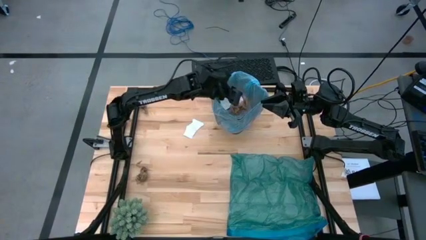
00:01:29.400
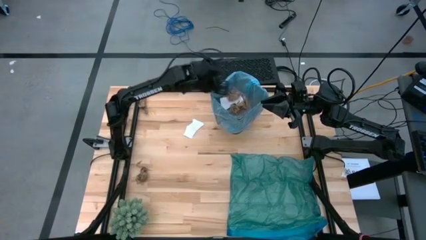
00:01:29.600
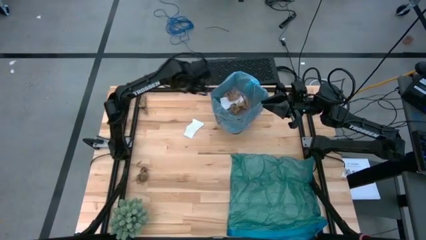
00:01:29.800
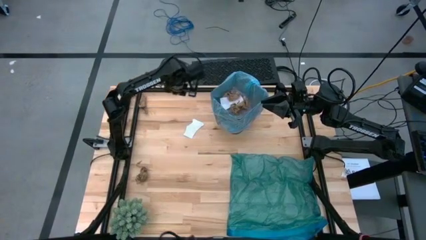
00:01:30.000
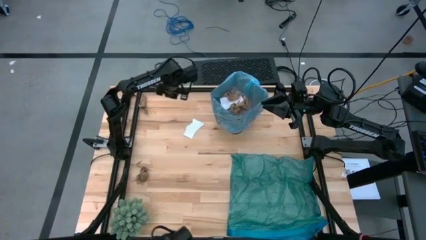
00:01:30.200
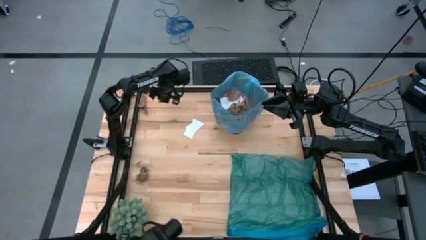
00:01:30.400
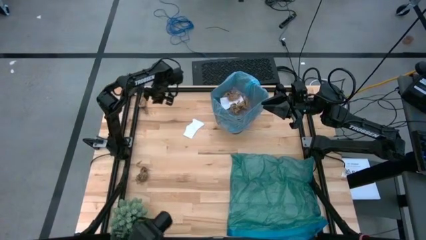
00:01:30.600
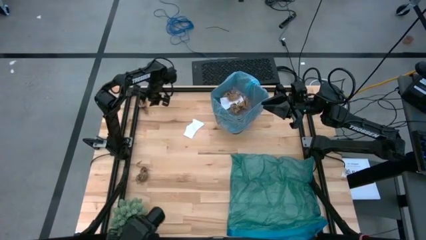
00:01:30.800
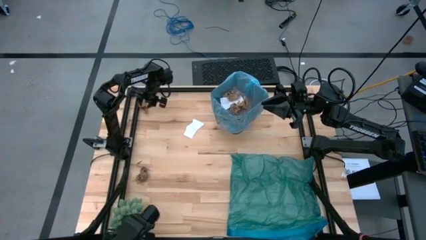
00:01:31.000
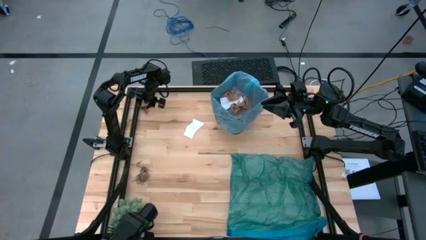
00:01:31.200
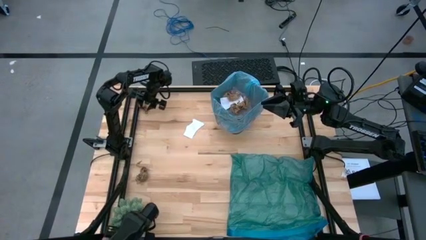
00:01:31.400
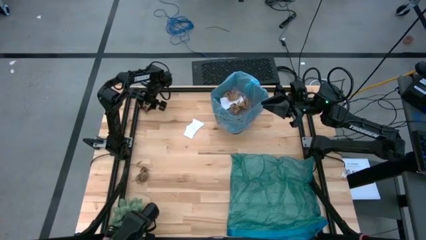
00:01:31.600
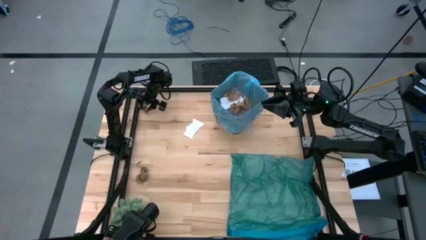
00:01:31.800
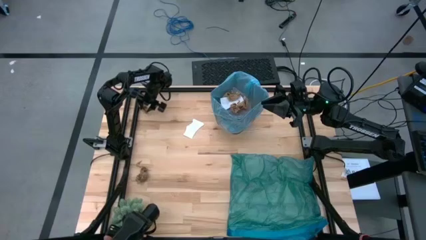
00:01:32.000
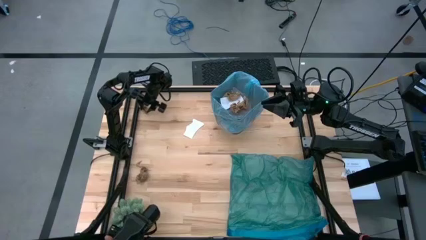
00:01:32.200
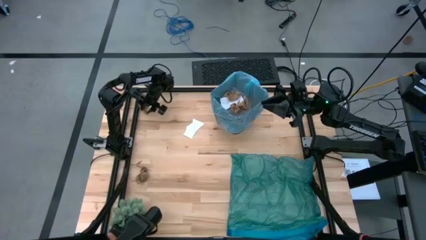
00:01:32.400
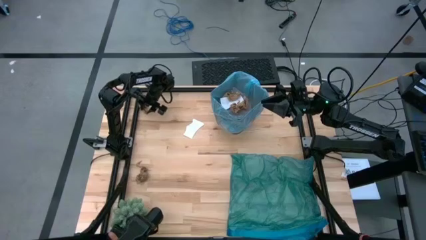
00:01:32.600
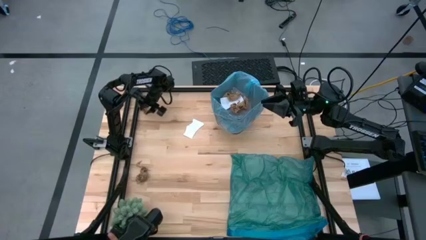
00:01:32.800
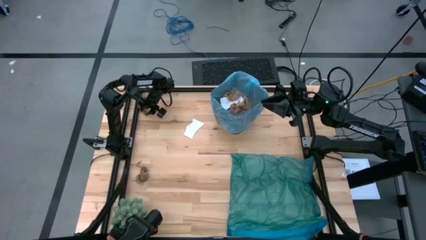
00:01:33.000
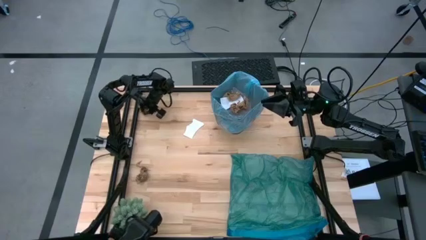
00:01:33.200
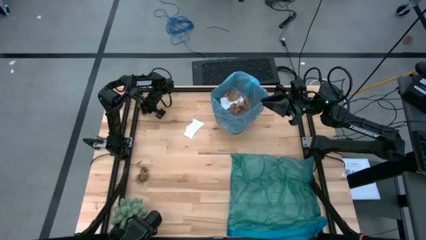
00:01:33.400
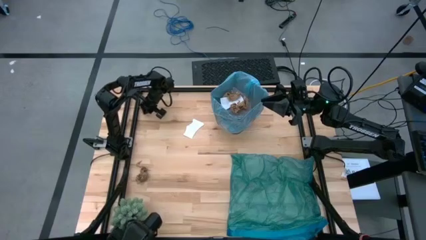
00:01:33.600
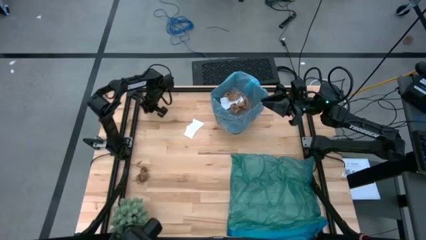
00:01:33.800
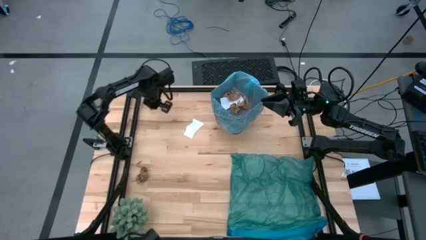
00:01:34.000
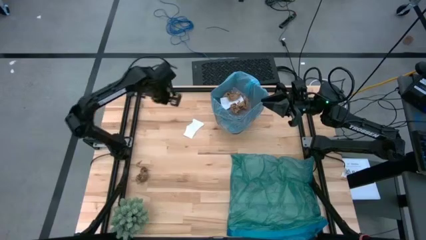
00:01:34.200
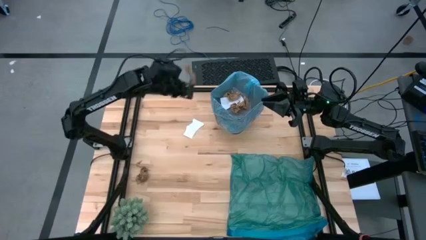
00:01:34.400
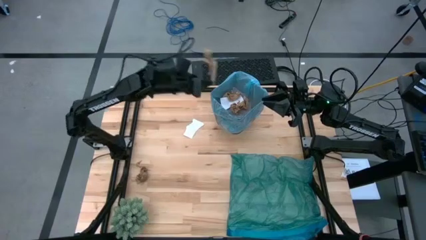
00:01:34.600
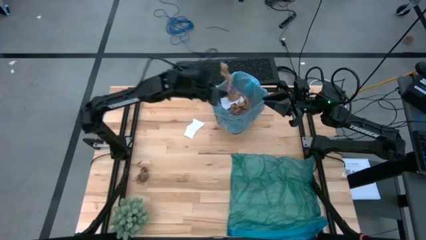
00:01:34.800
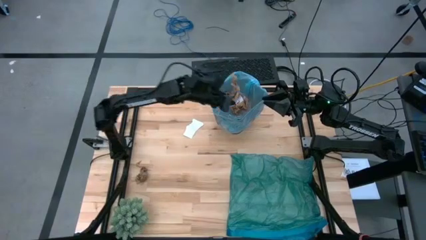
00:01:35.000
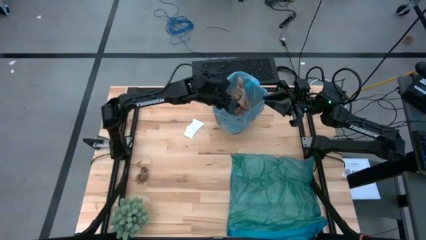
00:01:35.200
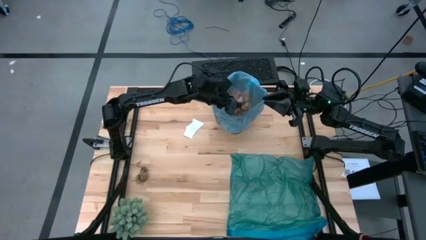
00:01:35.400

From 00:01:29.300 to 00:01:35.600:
Task: place trash/remove bag and relplace
Put the brown napkin into the black trash bin

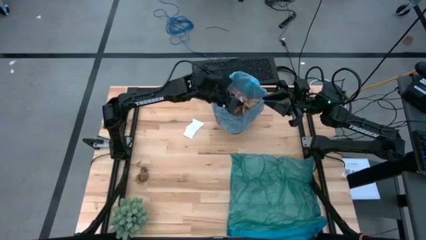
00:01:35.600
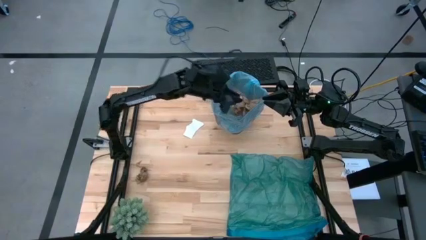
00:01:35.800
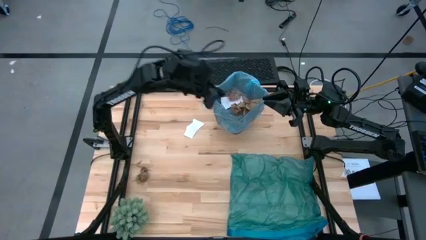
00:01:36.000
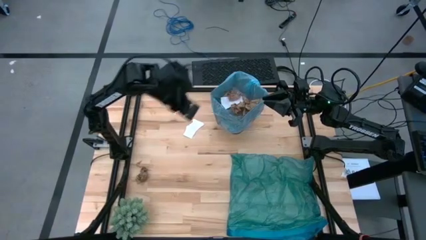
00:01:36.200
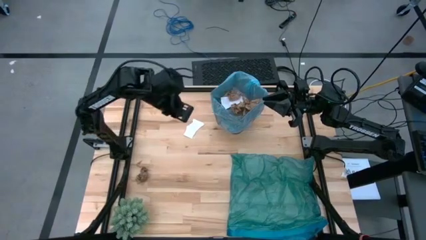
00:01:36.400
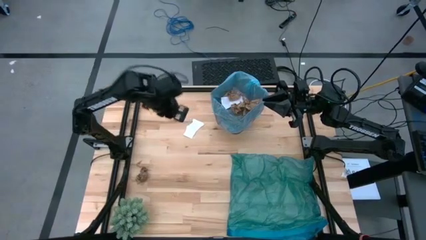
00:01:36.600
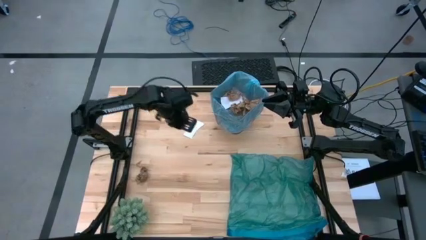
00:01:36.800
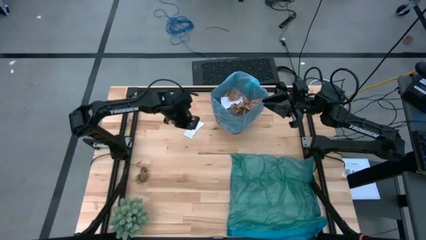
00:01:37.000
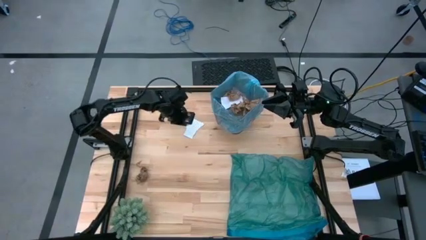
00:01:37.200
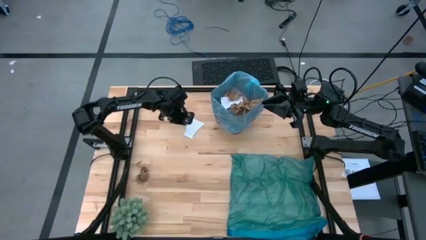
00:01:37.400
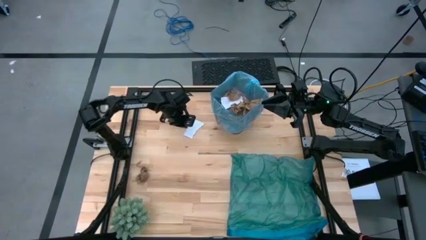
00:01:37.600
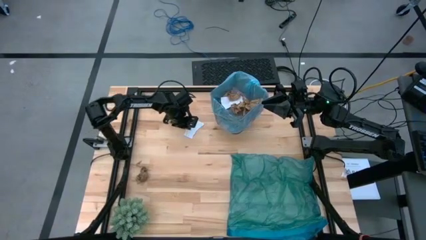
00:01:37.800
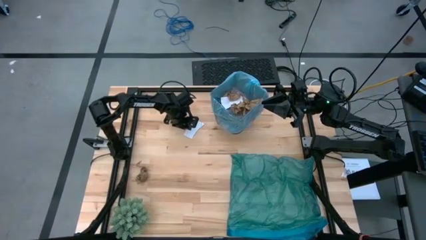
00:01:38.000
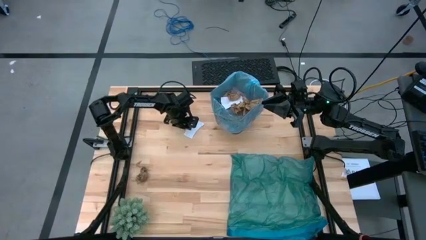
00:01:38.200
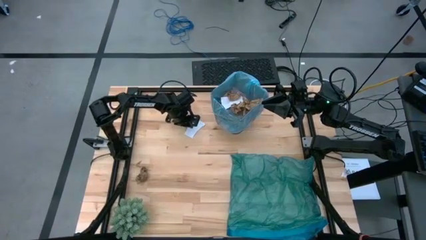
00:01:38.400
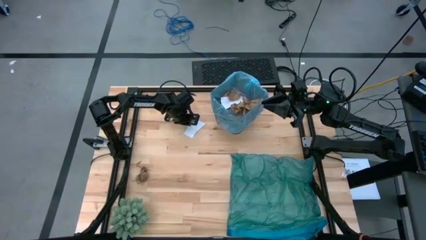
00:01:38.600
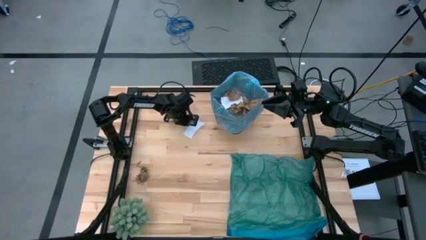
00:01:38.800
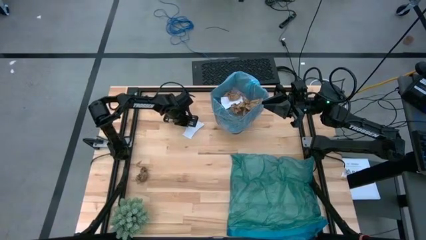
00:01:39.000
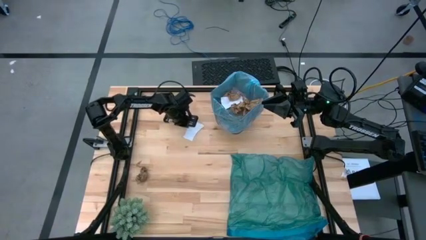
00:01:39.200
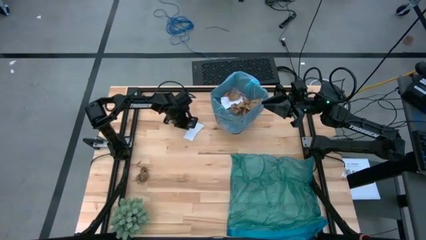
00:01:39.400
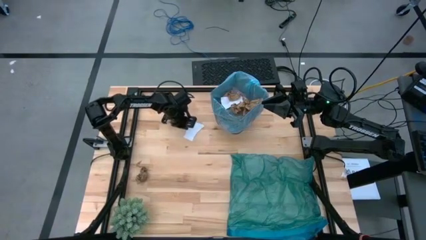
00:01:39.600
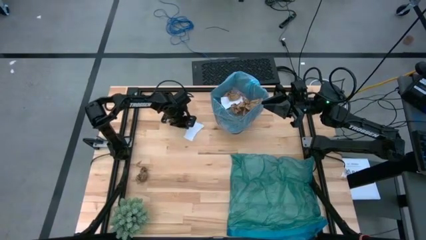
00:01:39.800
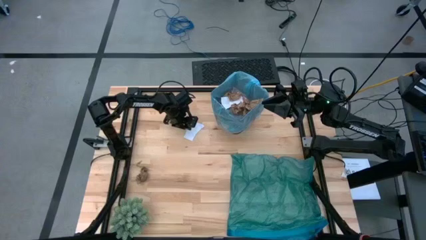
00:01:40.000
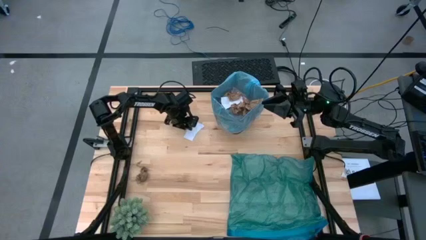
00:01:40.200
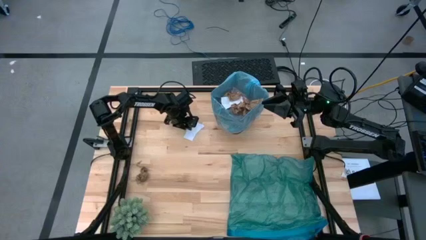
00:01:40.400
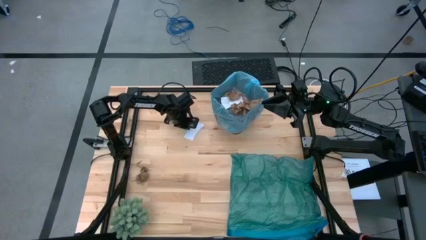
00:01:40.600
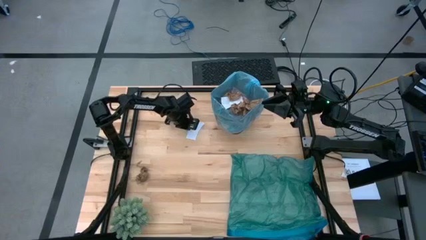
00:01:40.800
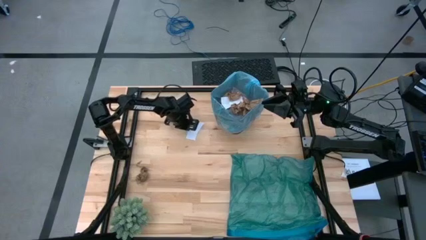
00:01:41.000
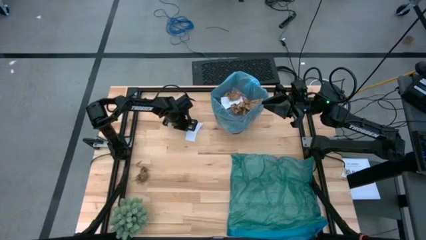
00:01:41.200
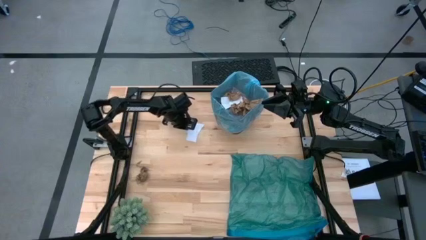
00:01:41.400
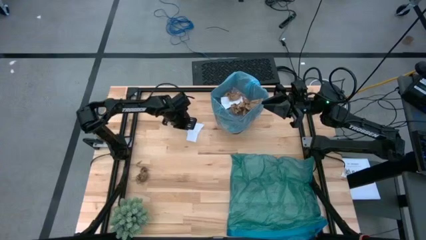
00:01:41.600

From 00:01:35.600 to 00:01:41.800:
Put the brown napkin into the black trash bin

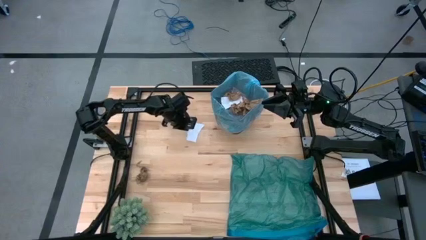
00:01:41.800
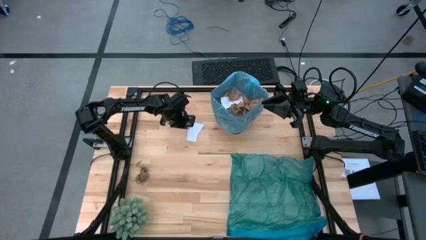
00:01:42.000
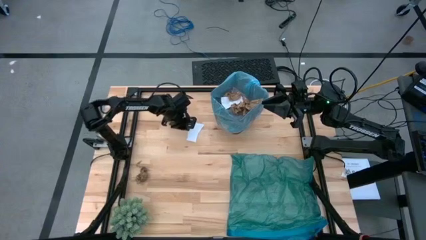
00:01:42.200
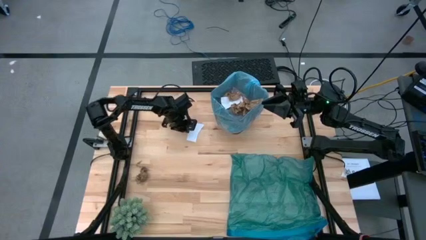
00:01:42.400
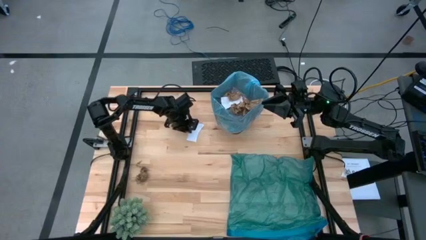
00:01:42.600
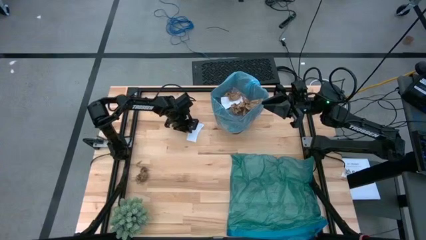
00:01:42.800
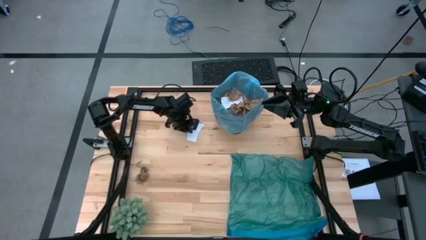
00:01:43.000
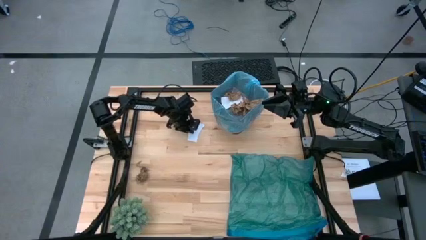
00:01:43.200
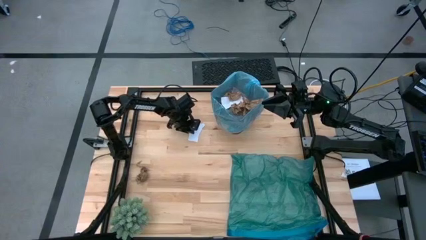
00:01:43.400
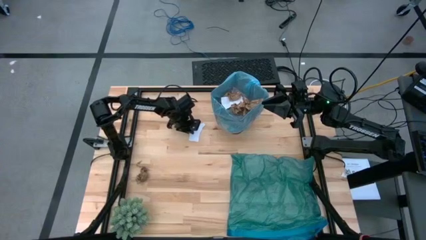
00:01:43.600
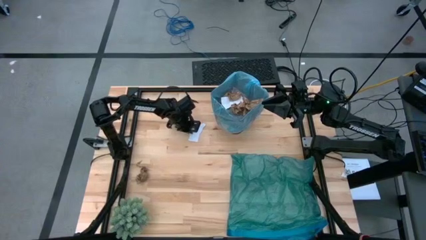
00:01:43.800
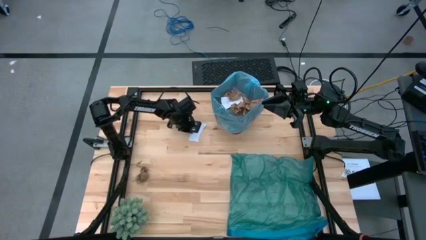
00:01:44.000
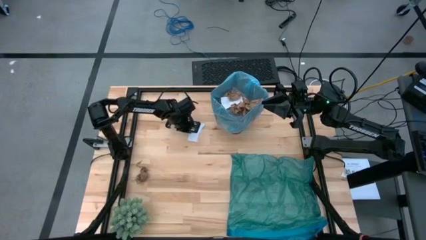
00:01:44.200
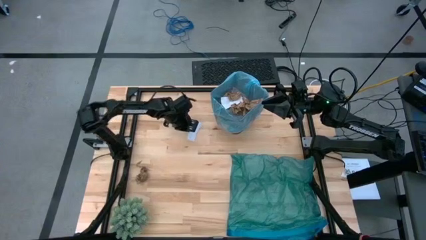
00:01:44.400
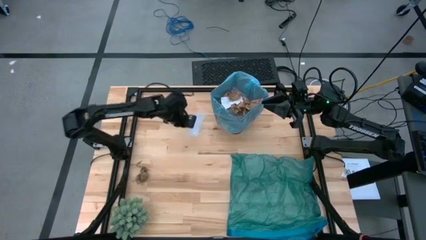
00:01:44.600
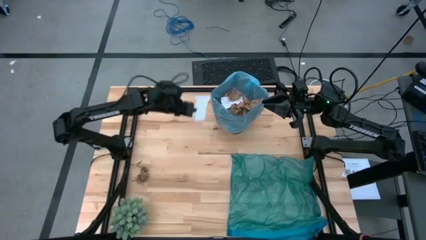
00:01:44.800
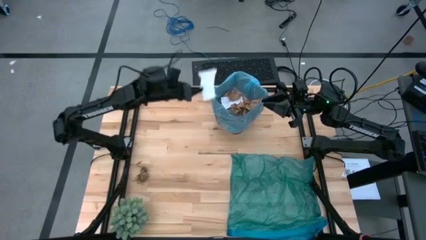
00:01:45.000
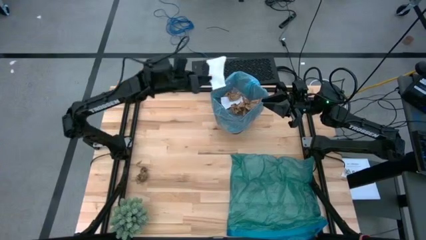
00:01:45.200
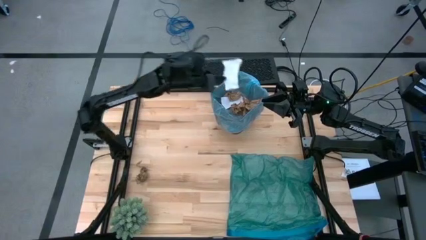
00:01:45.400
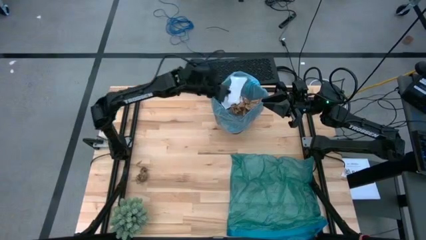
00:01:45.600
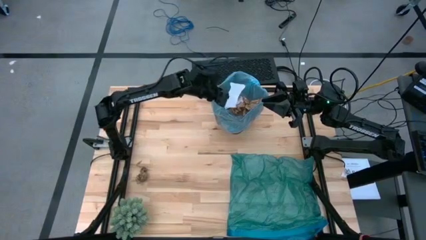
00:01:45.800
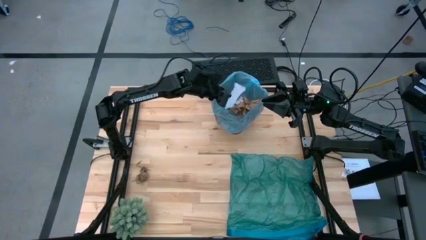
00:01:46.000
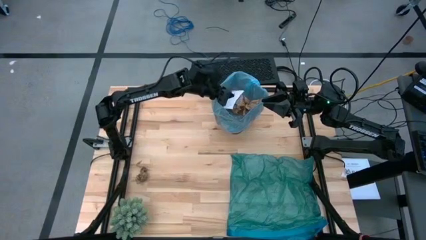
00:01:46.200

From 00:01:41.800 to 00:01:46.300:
Put the brown napkin into the black trash bin
